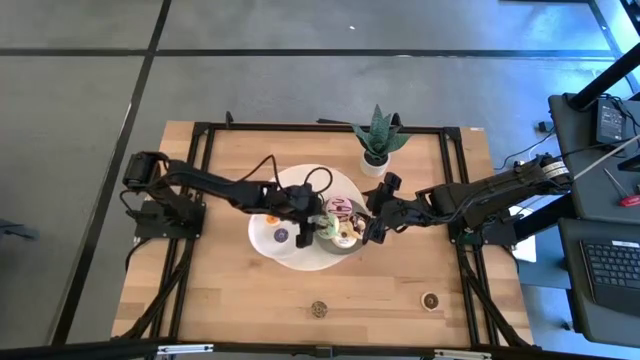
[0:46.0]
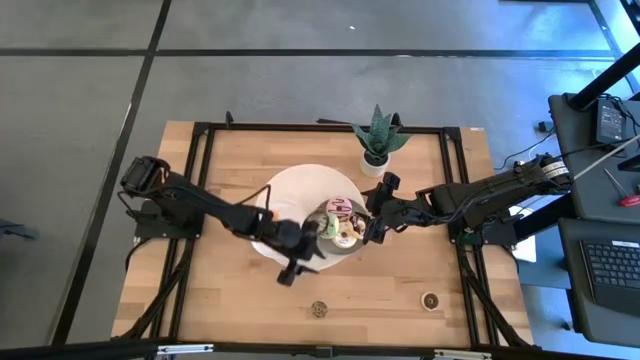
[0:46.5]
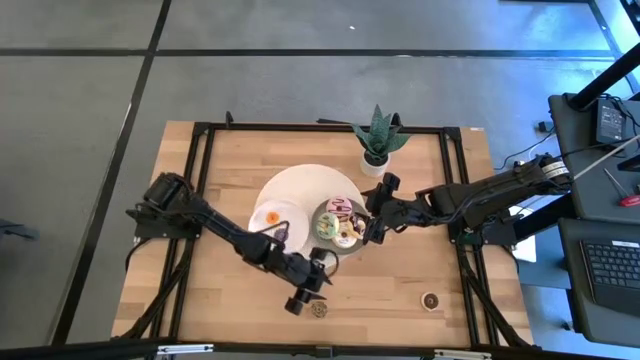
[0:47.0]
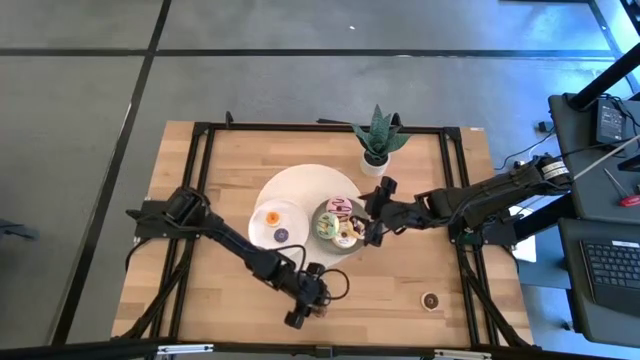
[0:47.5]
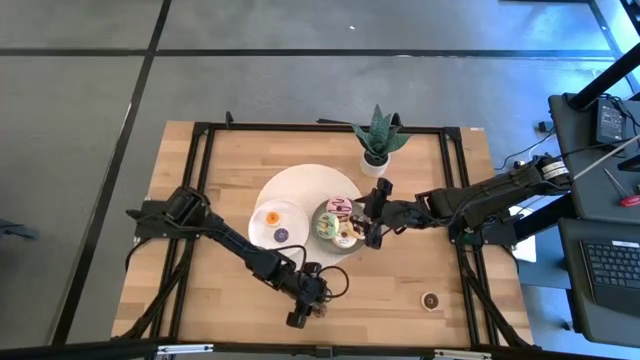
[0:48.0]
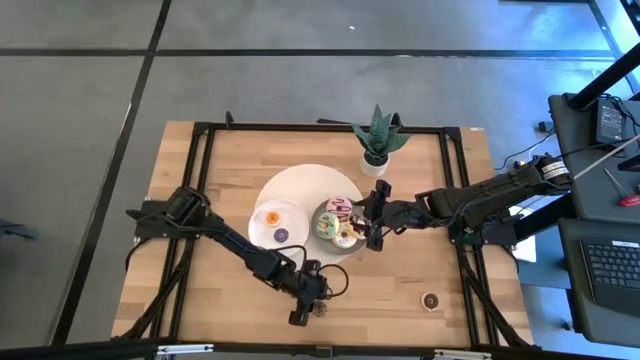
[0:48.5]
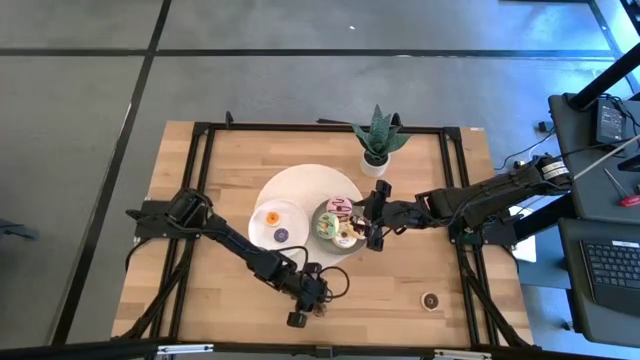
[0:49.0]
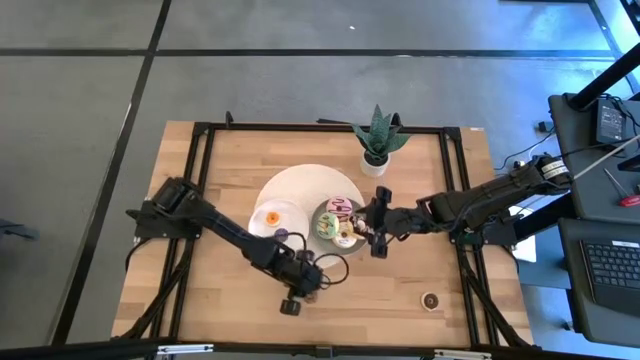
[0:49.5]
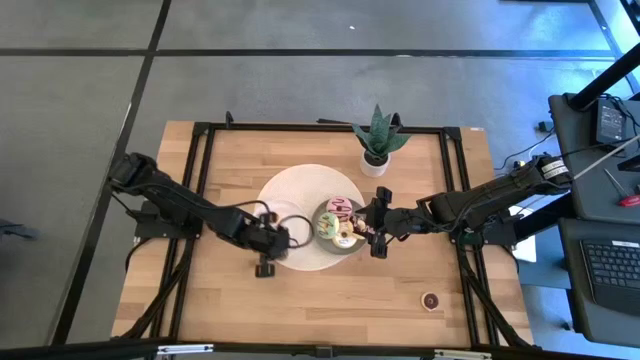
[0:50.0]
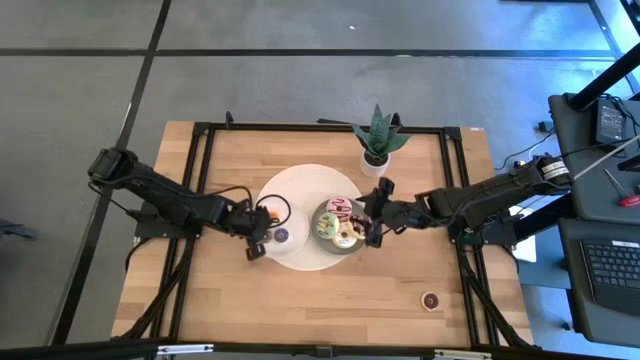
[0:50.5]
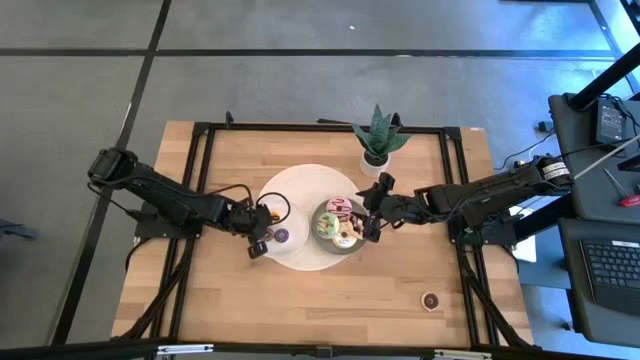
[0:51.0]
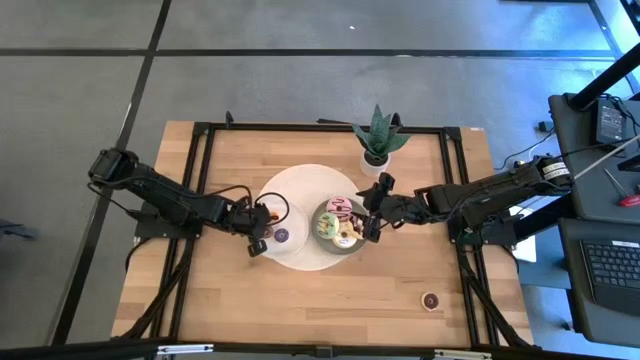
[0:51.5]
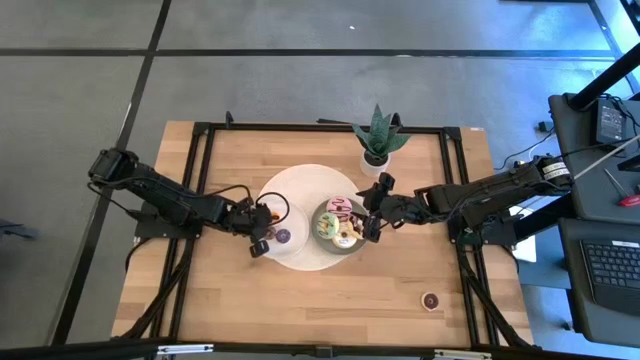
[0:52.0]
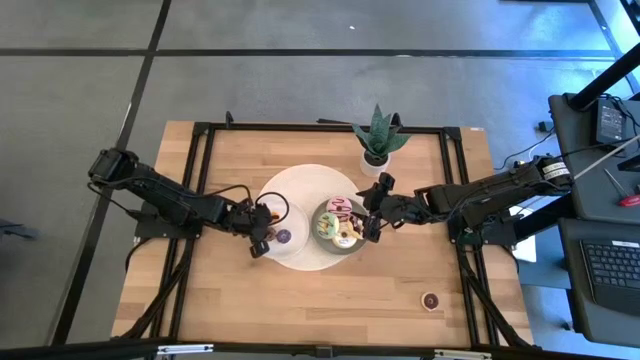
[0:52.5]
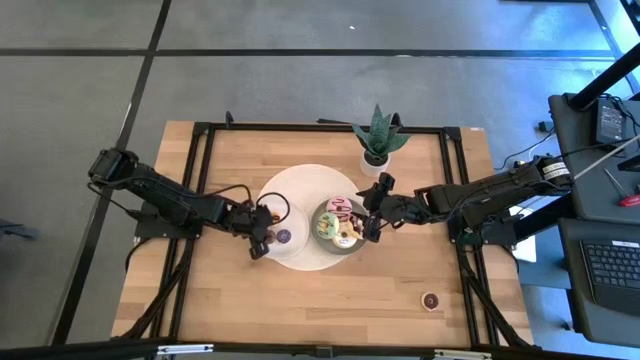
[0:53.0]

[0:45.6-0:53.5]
Task: Pick & Place donuts
Put the small brown donut on the white plate

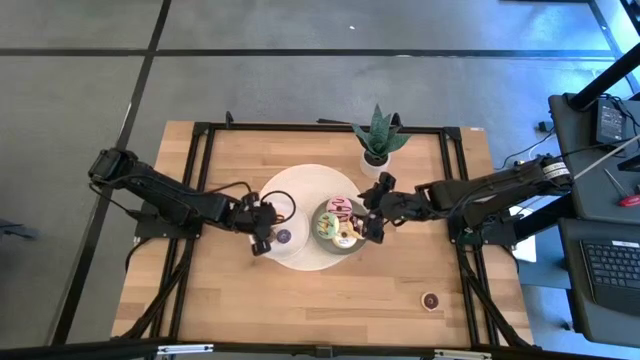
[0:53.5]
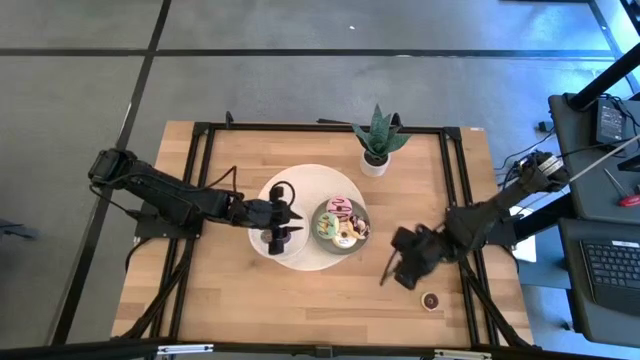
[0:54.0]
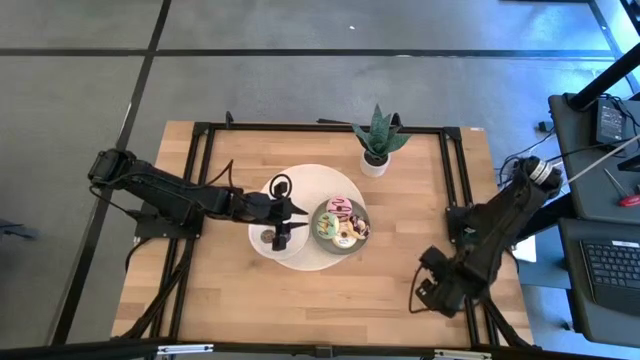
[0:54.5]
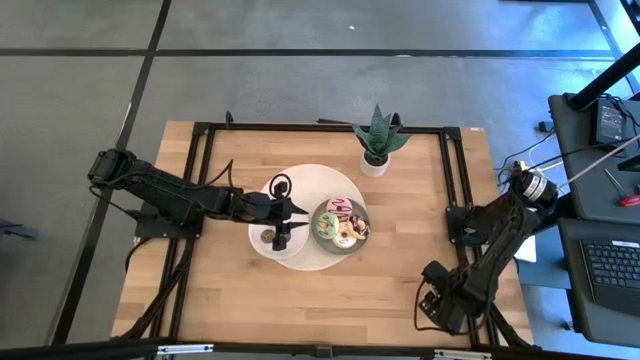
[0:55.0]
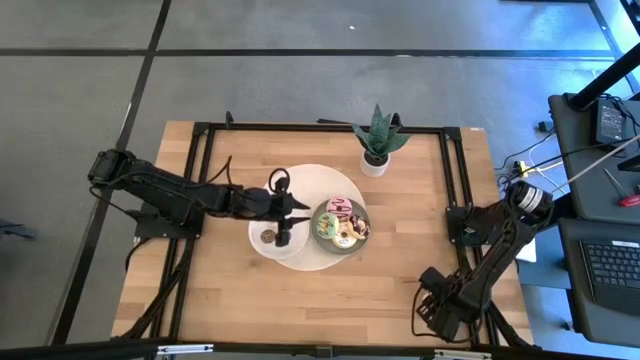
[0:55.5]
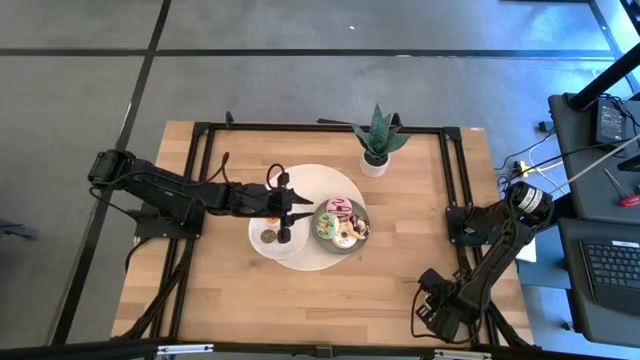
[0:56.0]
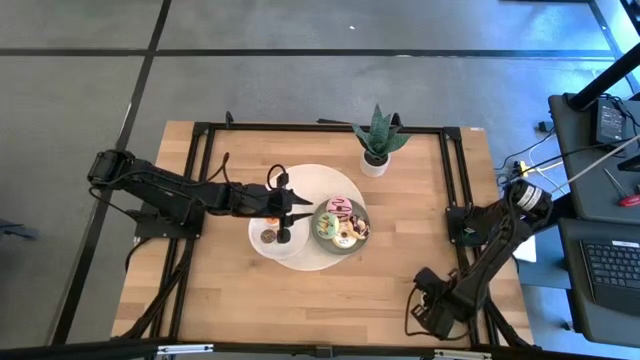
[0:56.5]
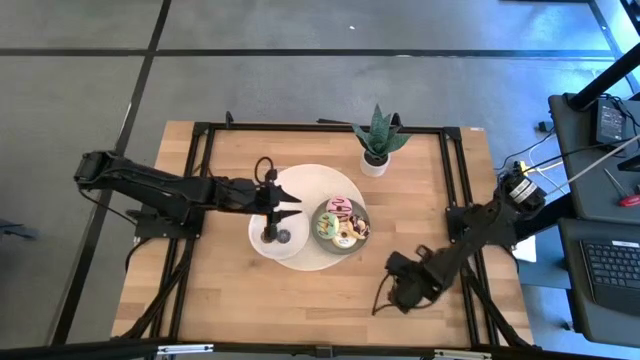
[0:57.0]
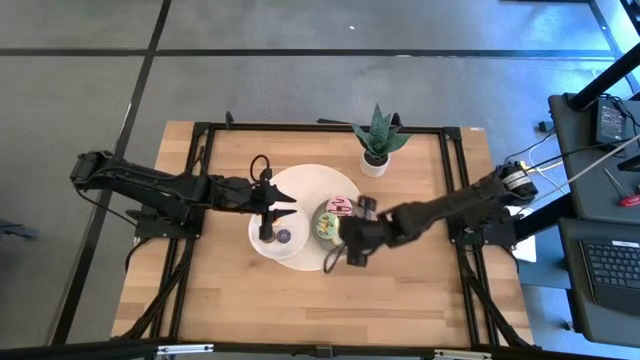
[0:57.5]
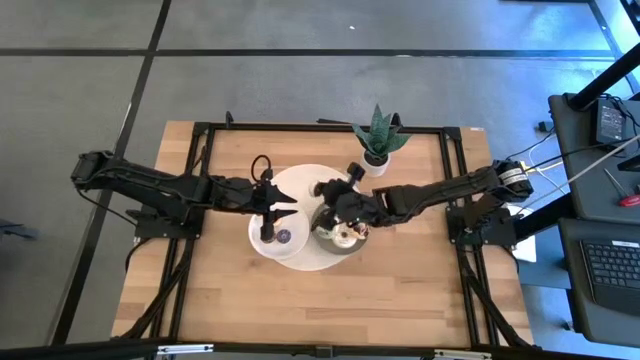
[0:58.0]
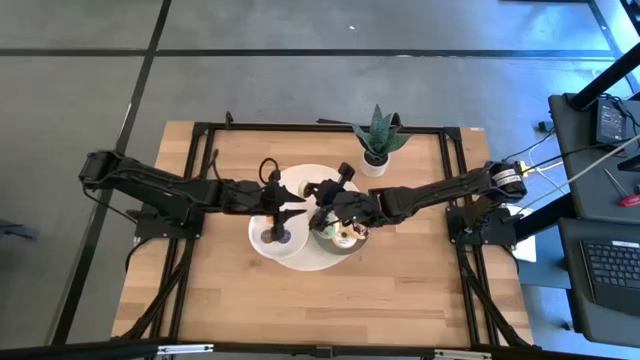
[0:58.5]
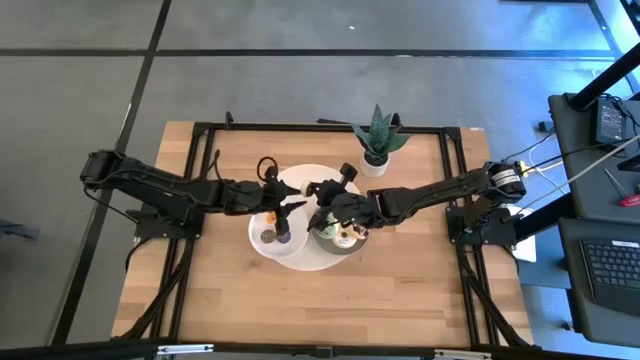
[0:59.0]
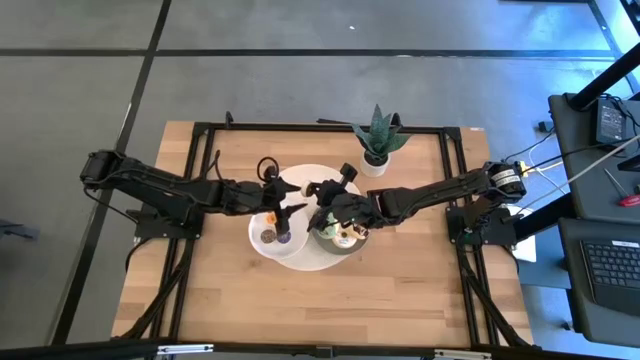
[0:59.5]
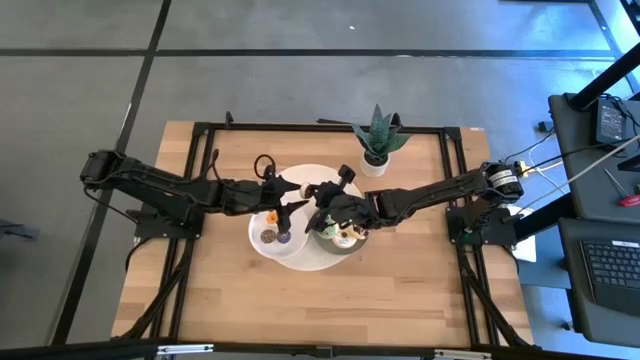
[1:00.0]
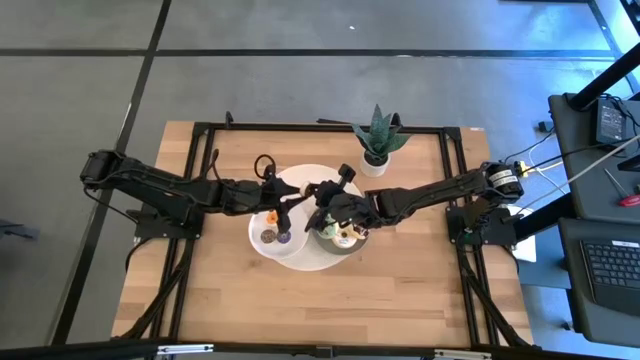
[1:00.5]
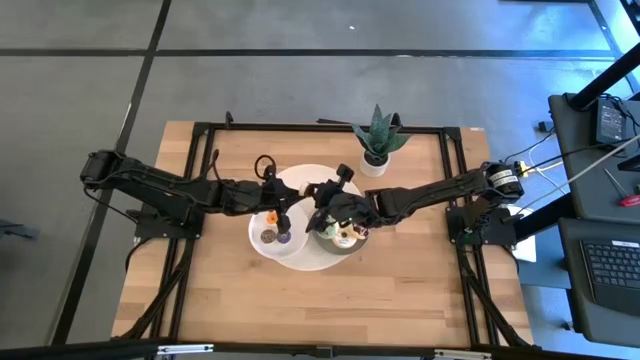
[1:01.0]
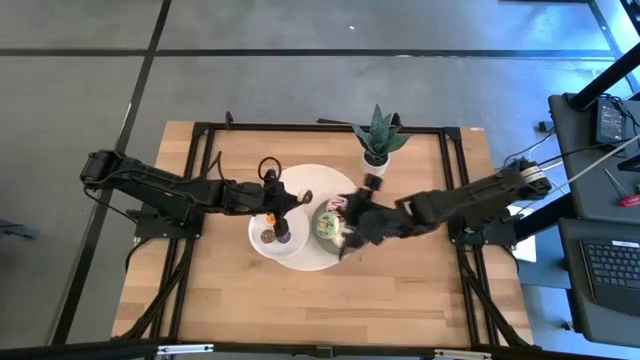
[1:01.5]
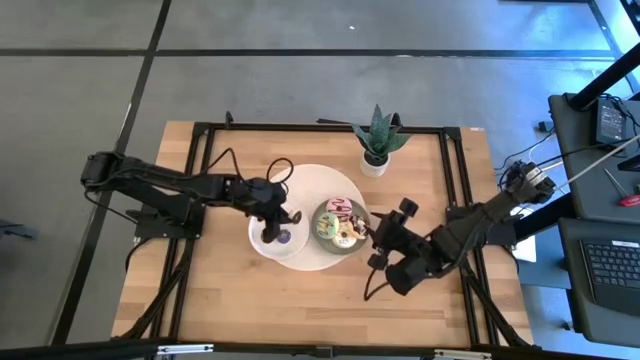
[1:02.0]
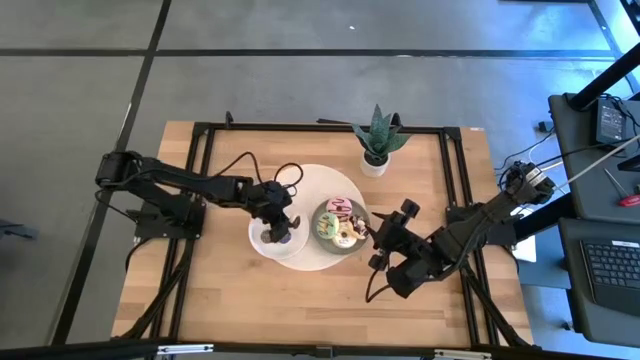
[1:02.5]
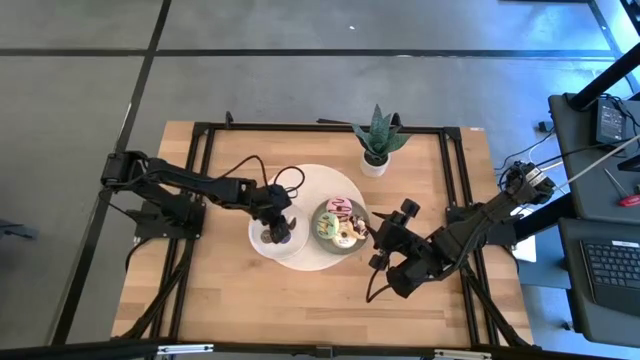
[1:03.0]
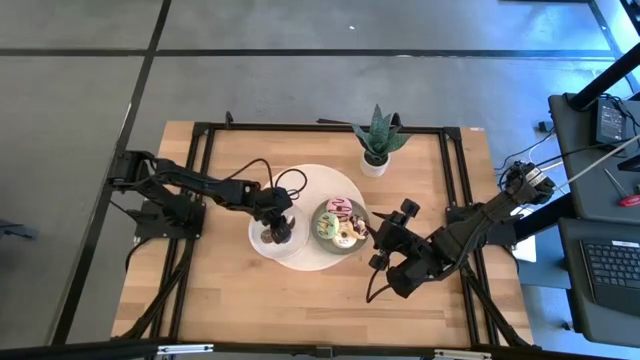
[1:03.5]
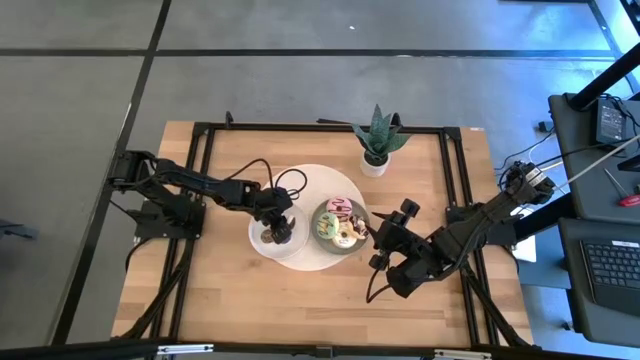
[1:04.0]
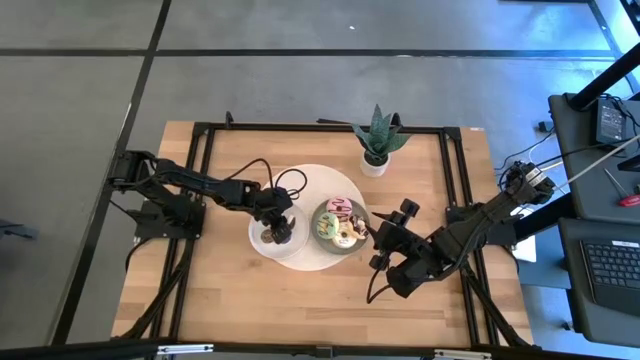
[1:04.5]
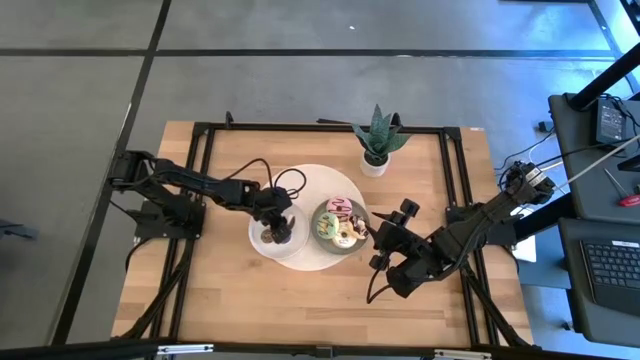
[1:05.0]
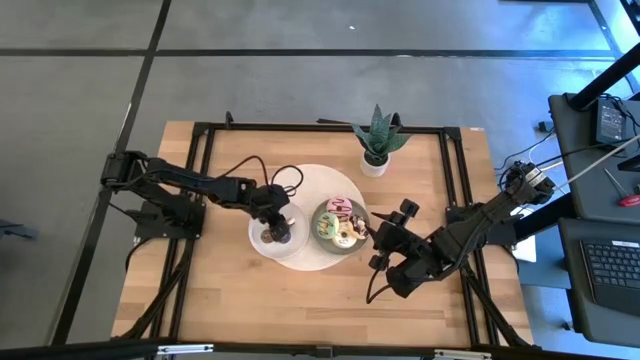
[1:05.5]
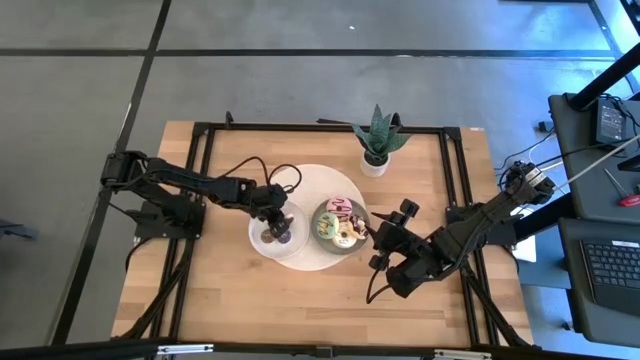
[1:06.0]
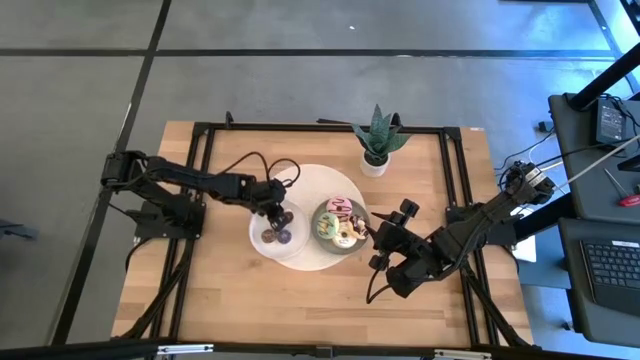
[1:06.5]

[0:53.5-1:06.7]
Put the small black donut on the white plate
